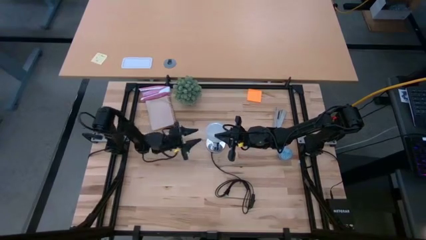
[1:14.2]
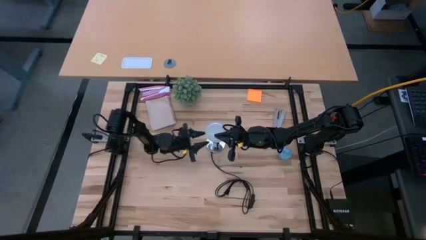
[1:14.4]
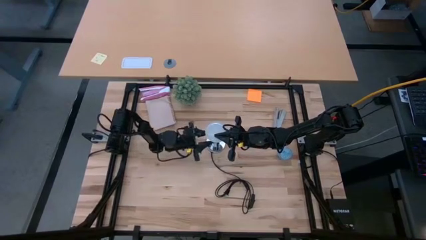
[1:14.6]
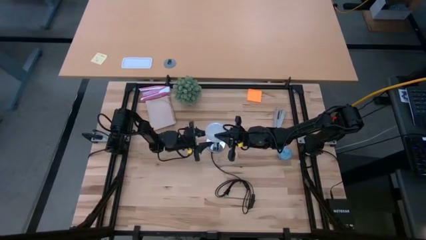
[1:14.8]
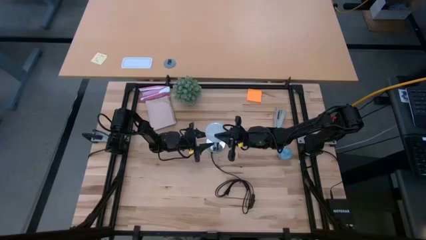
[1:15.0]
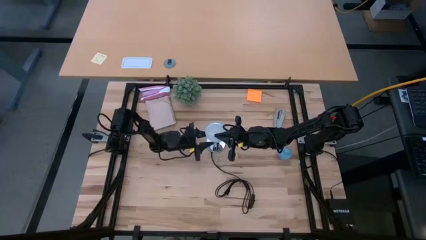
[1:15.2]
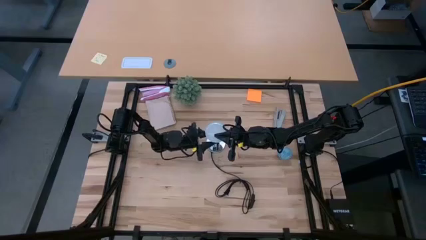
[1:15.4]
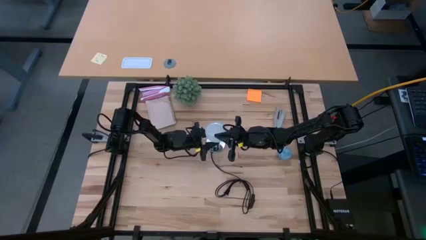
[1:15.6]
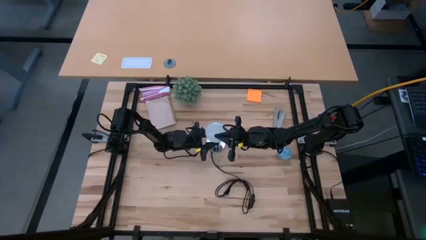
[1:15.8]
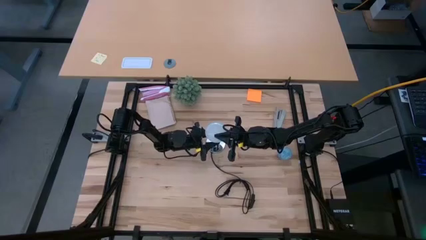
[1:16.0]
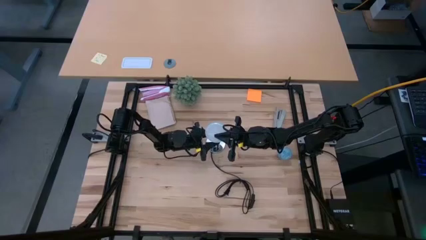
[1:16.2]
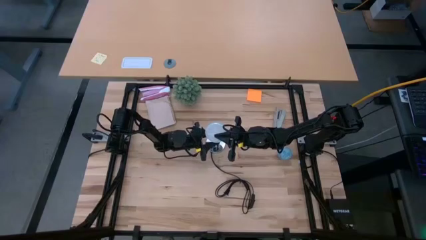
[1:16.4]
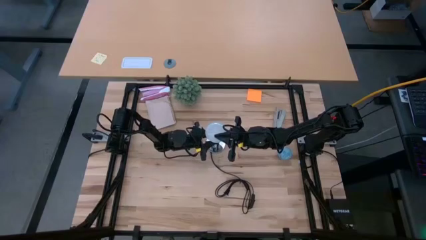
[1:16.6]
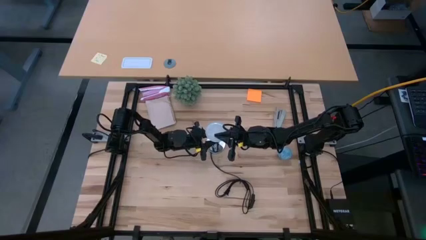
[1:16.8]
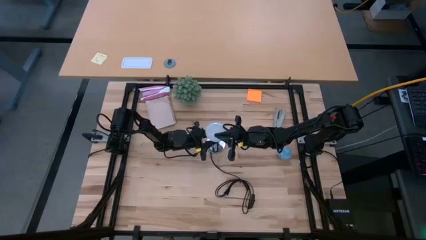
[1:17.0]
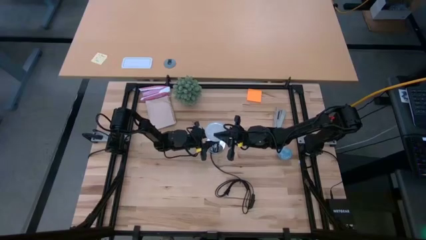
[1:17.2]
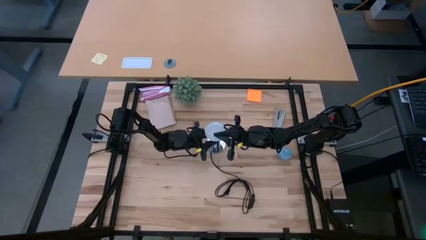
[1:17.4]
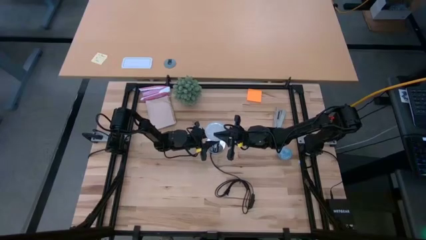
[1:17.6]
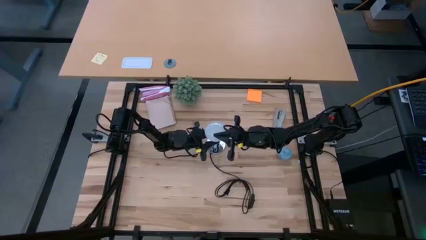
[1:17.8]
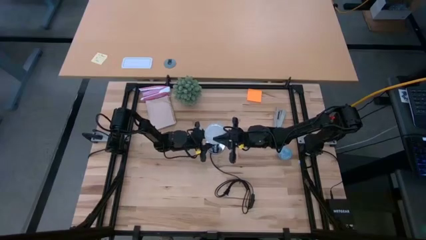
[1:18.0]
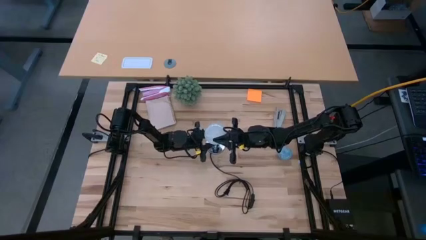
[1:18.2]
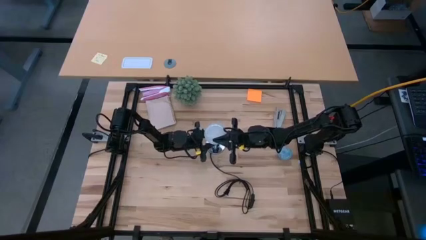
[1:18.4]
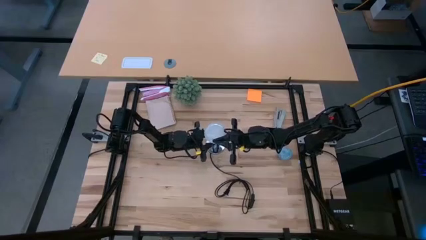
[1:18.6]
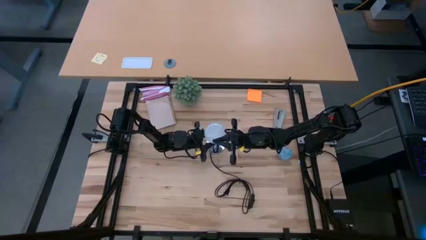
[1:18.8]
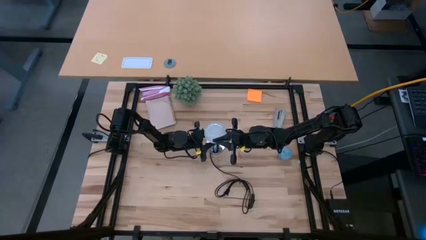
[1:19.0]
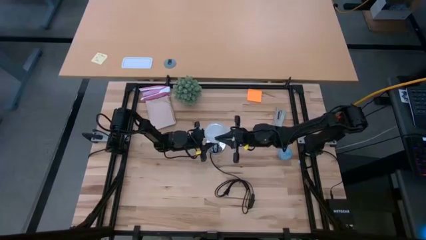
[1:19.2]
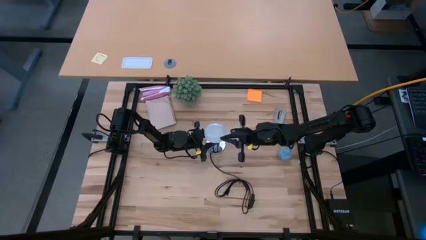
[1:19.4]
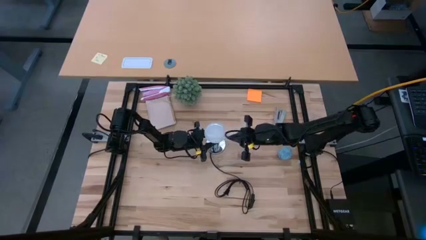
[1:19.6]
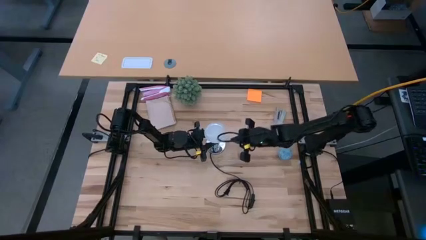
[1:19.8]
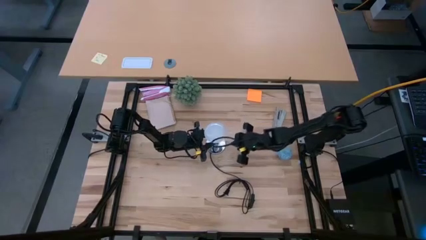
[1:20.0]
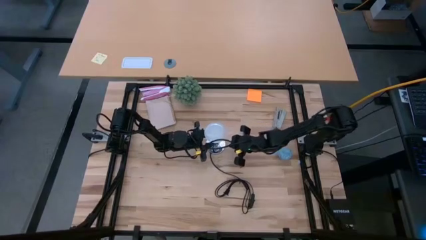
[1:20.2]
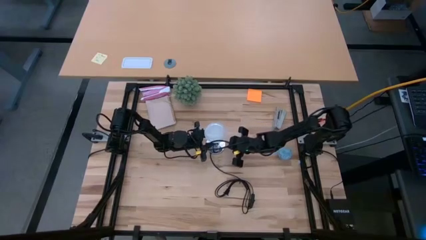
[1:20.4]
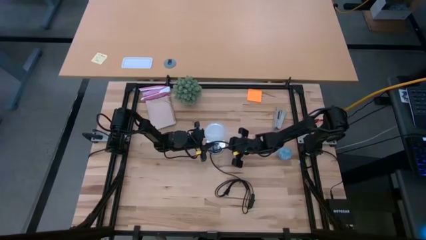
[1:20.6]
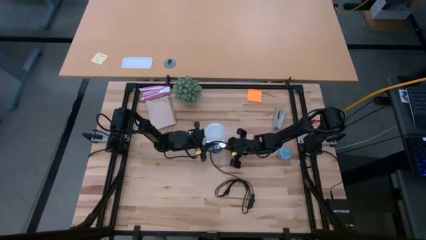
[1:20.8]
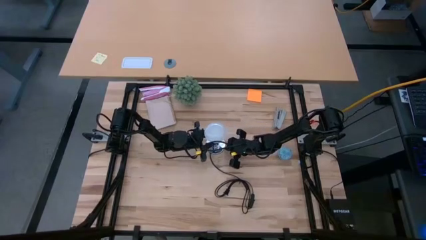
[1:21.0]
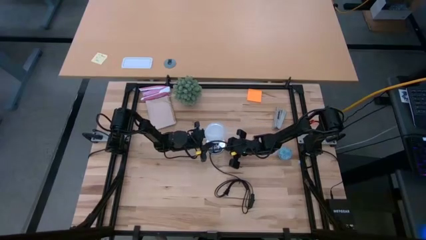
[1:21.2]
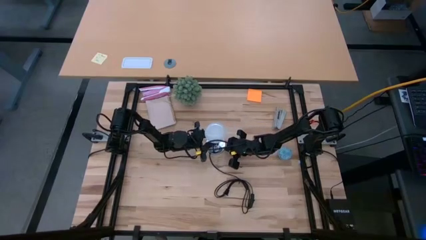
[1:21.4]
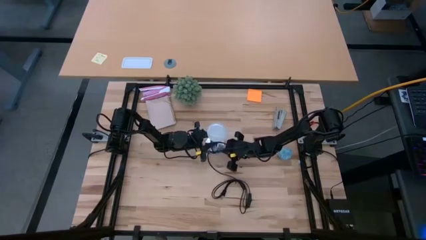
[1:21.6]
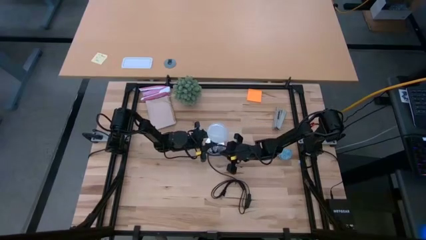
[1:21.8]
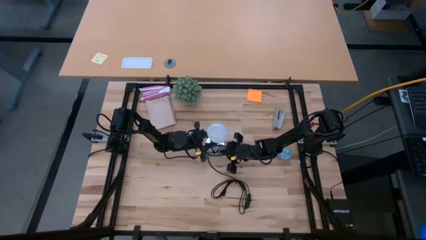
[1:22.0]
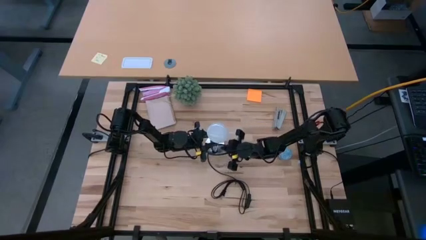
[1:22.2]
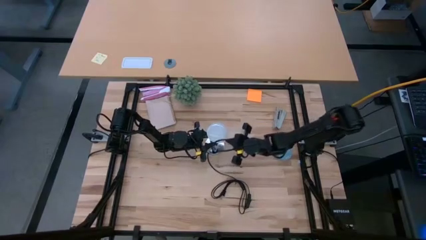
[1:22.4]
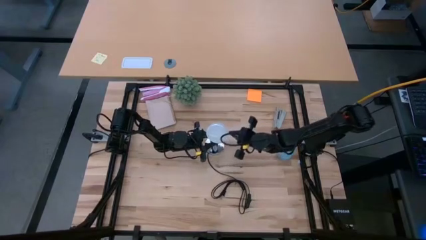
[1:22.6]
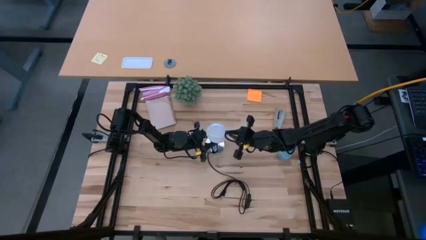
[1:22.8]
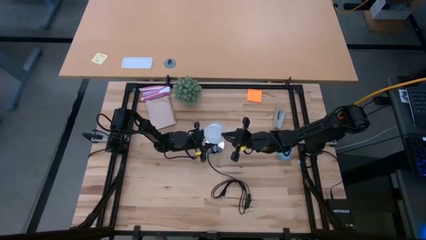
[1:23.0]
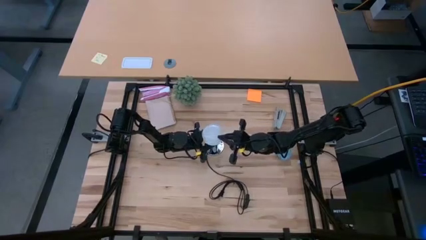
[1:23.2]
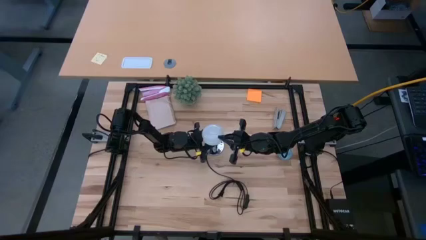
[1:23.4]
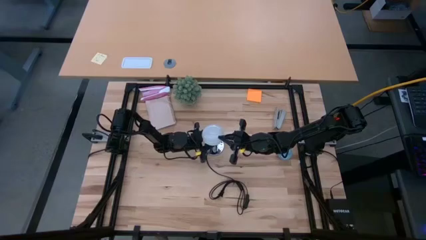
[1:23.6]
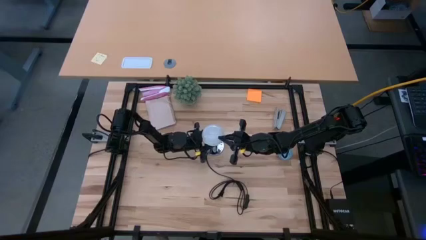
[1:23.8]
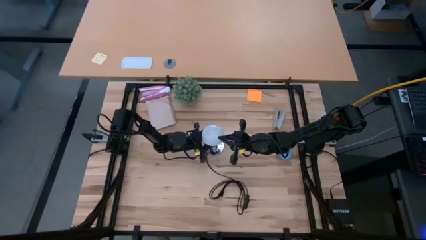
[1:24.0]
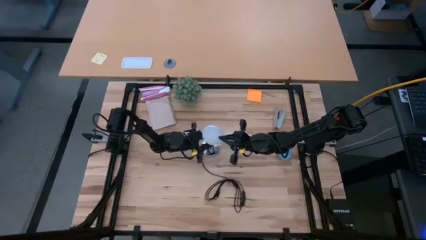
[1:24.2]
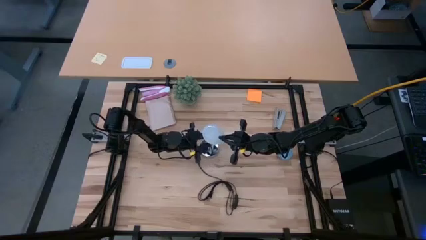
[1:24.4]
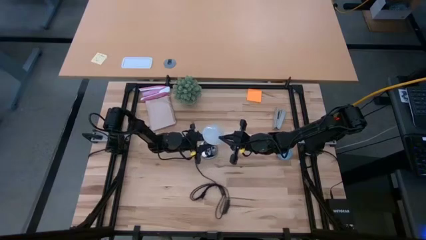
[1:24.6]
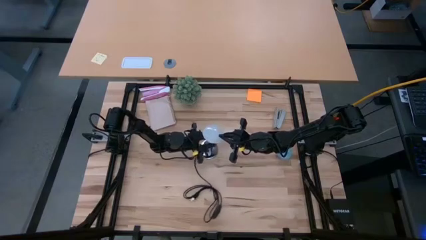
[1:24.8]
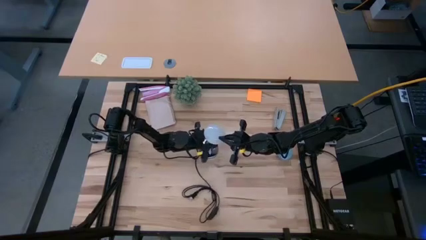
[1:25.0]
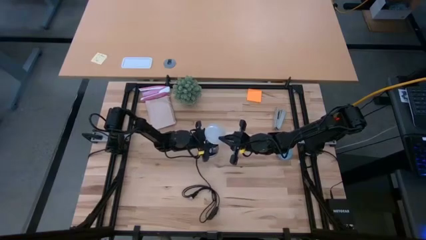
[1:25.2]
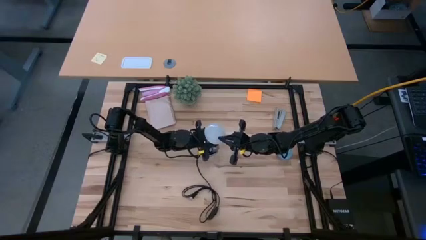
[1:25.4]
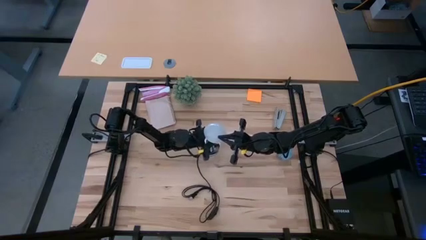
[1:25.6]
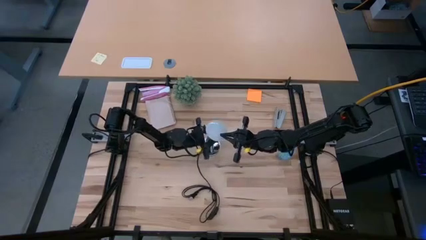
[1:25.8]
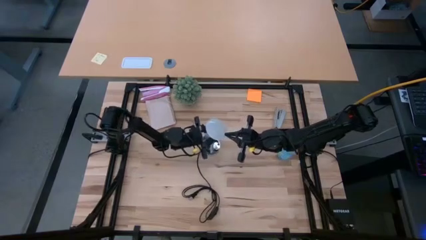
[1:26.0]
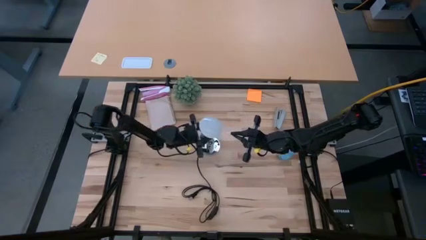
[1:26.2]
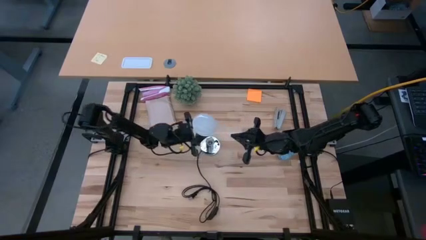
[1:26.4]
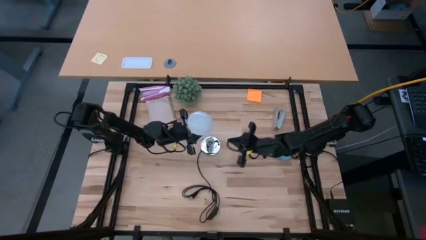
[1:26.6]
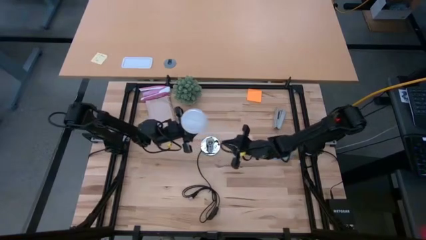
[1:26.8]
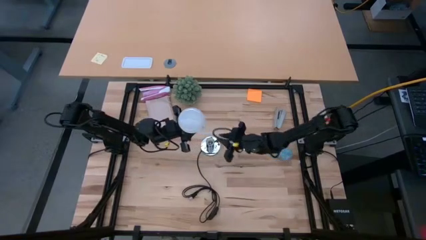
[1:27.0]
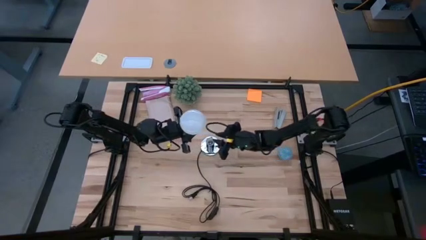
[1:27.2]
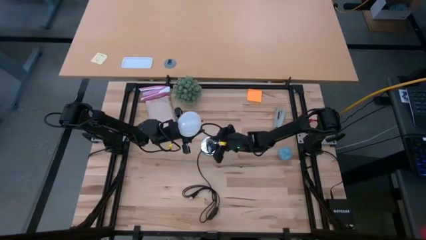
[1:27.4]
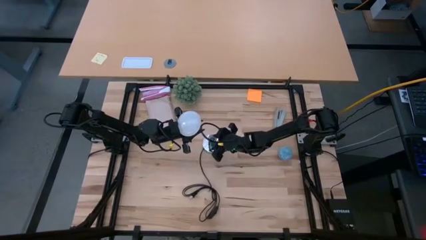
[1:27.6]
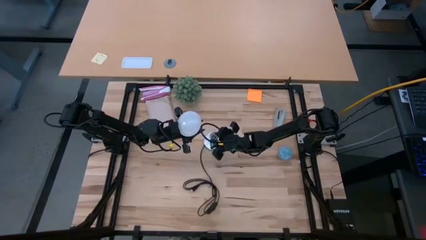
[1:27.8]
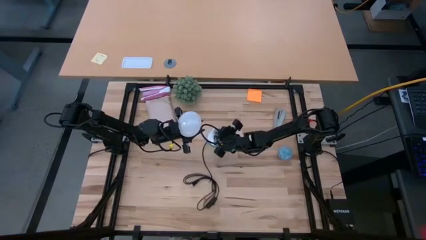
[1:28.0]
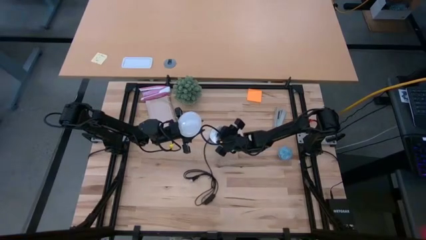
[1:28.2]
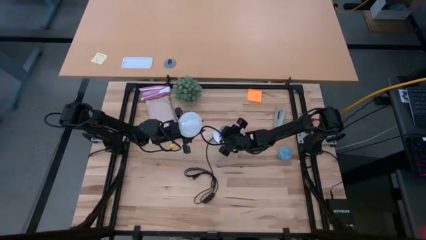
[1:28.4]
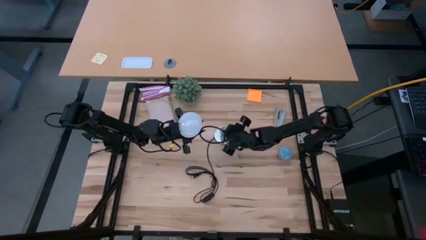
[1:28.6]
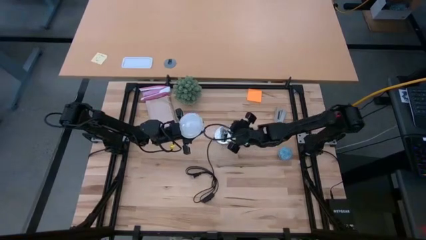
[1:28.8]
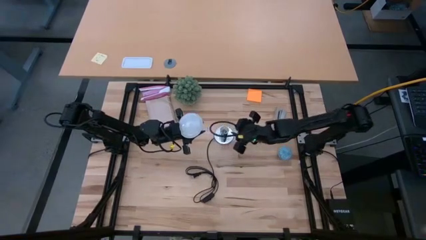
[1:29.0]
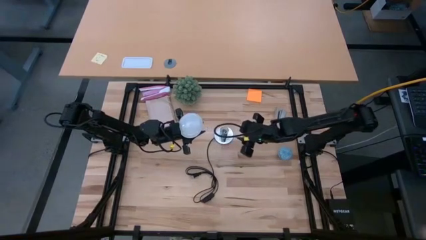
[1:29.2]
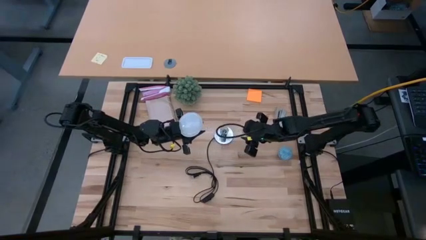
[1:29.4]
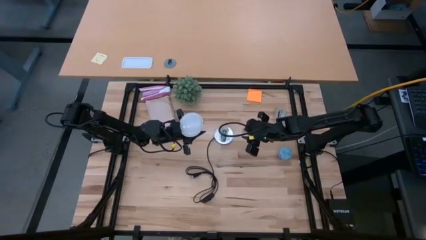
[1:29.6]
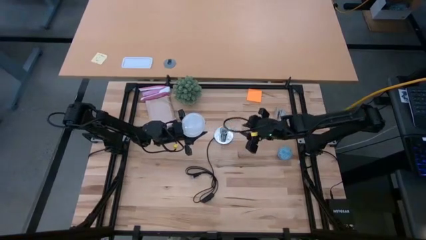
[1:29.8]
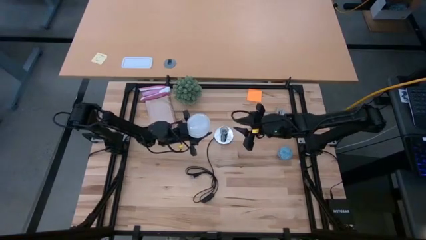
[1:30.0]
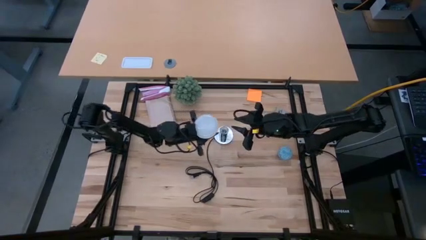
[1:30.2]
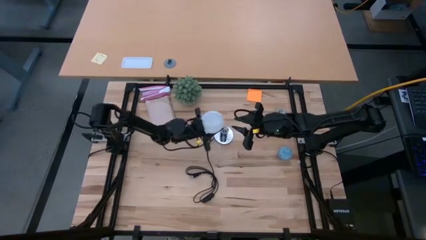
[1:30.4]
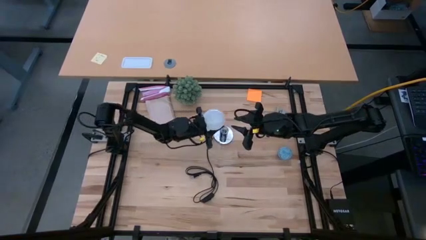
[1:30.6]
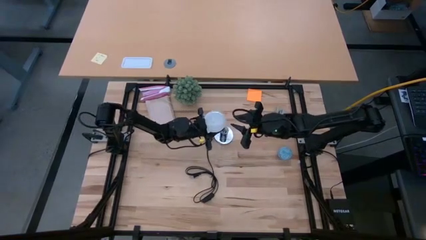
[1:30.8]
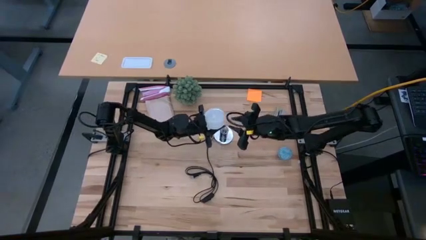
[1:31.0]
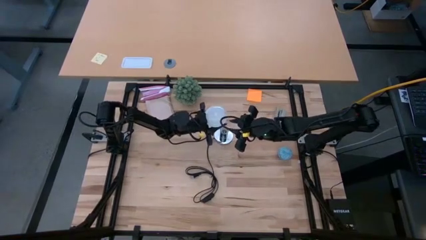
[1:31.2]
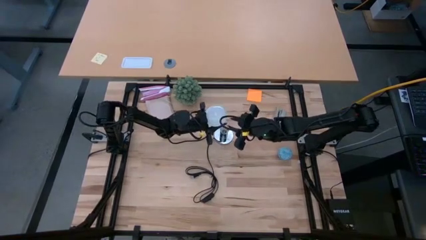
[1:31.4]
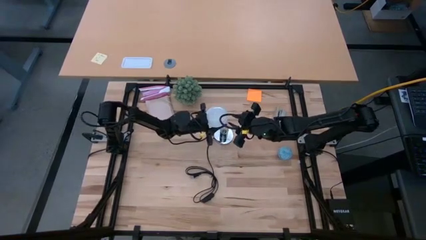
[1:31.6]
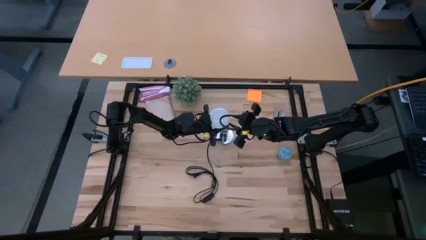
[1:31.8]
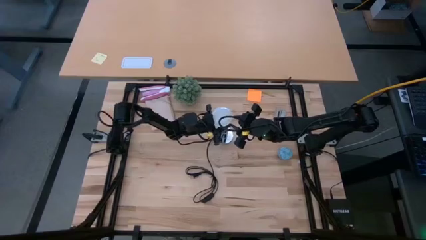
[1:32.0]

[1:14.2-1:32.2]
Task: Screw lightbulb
Insert the lightbulb into the lamp
